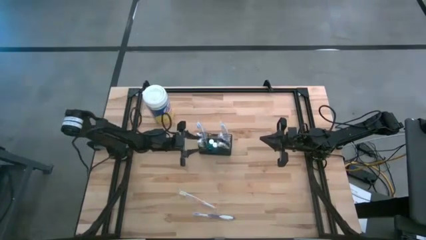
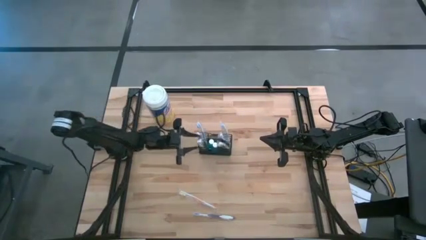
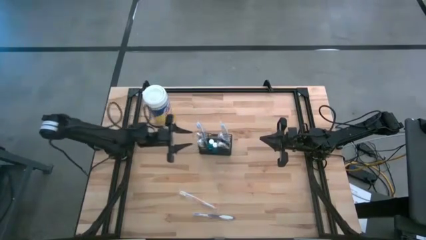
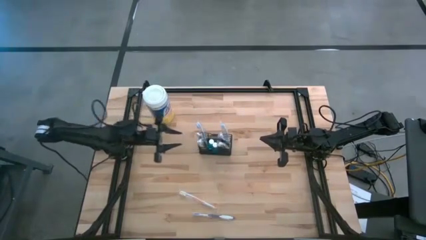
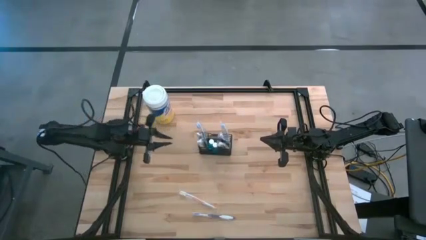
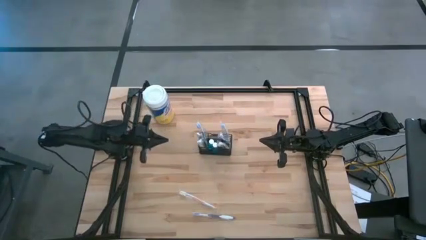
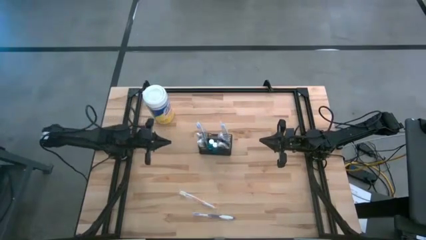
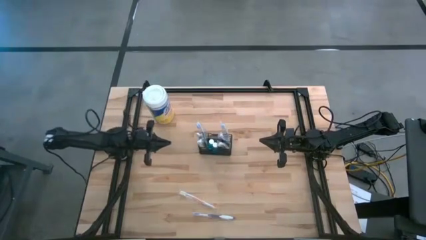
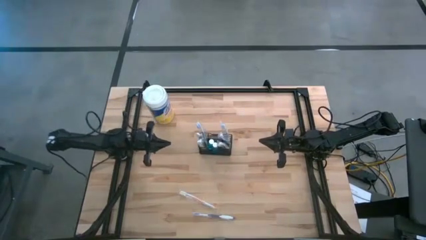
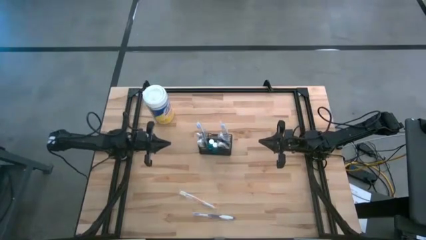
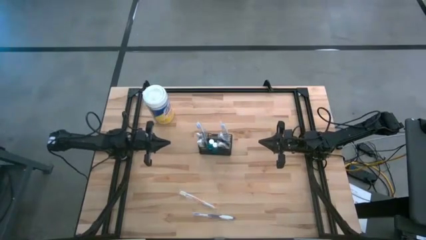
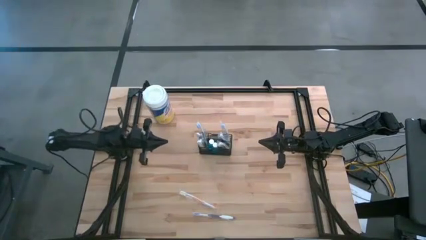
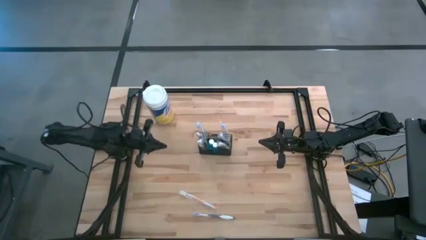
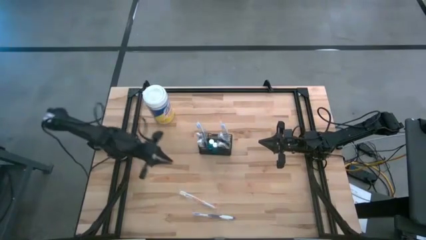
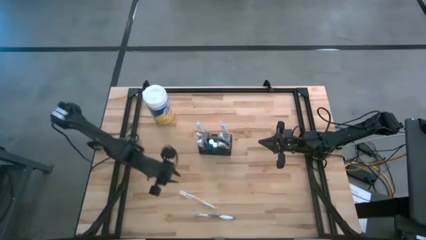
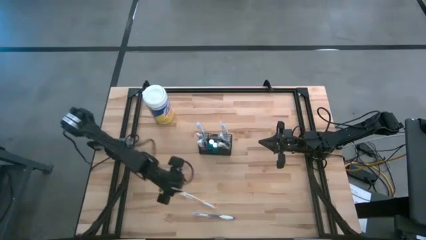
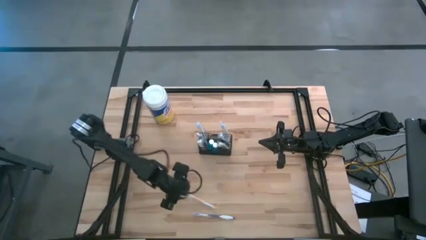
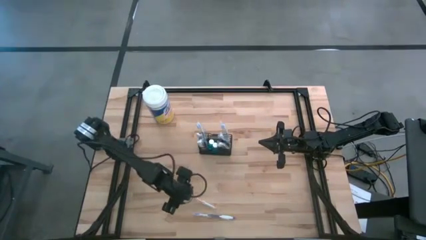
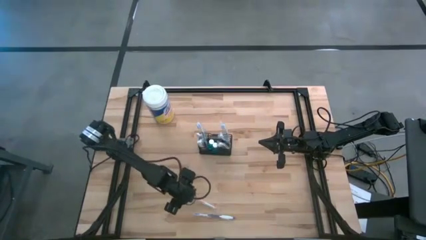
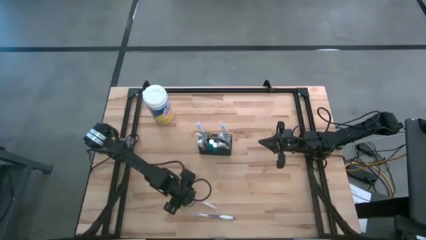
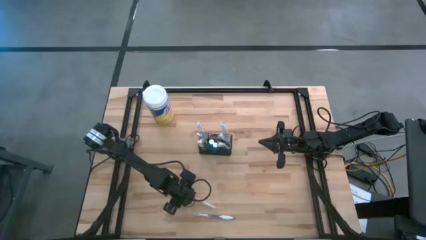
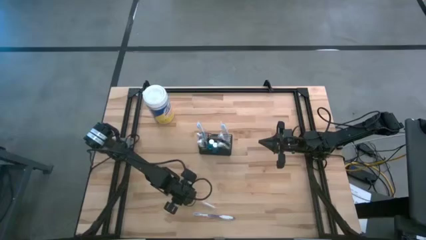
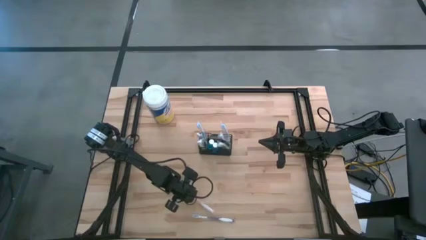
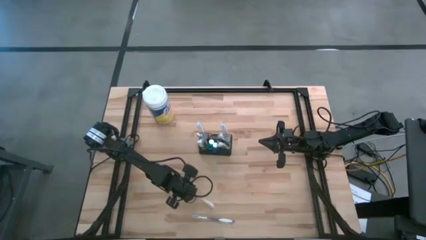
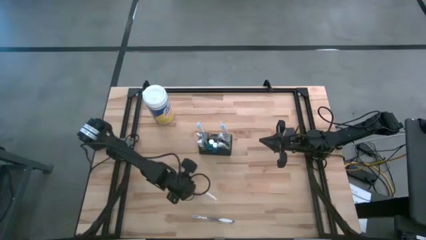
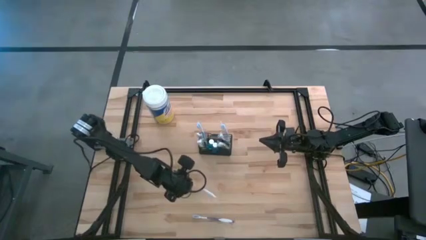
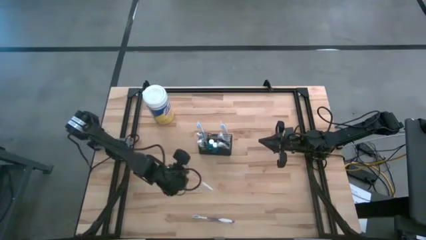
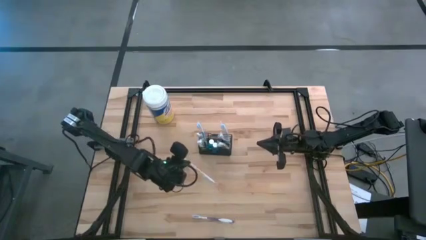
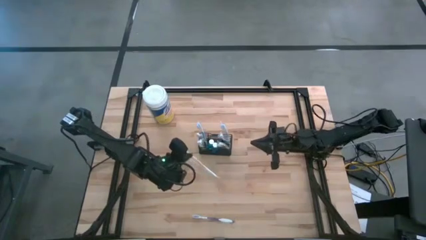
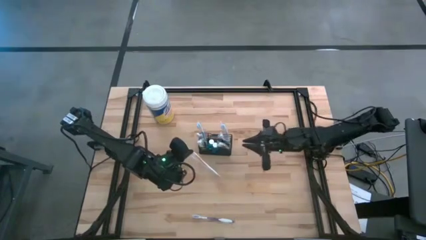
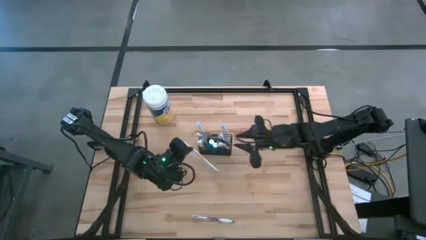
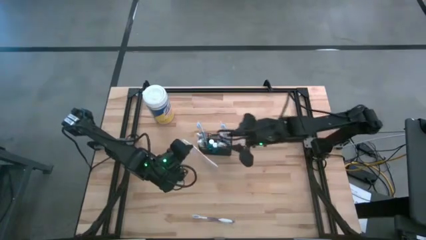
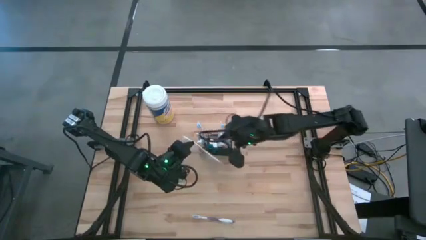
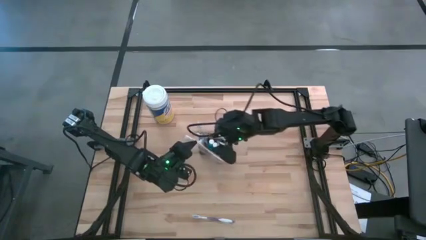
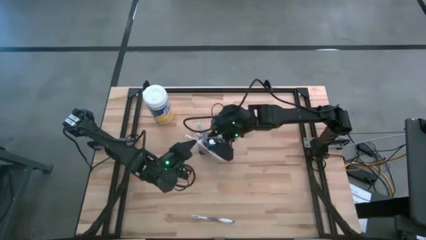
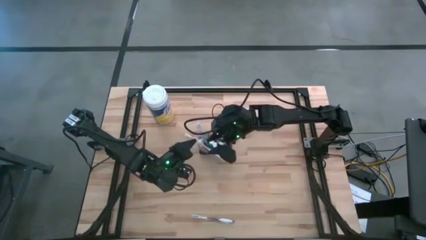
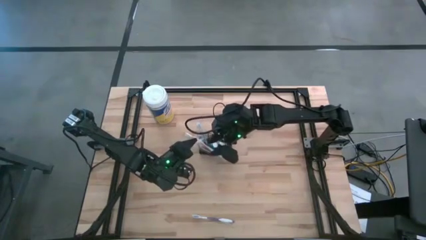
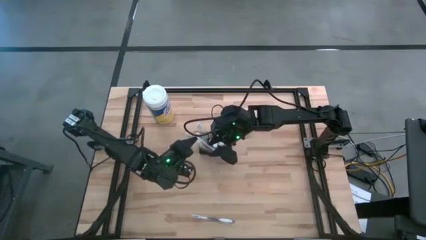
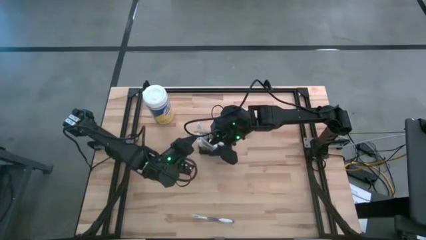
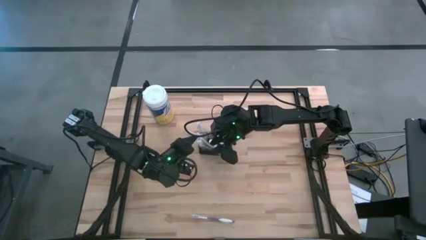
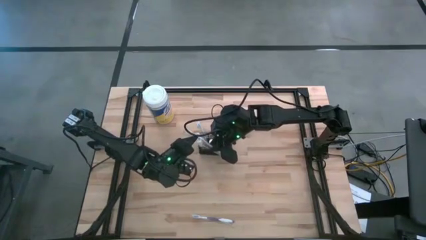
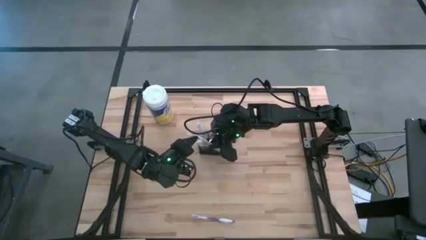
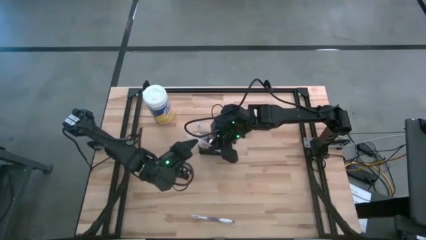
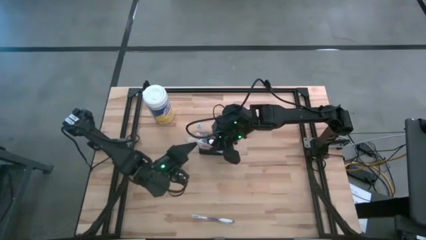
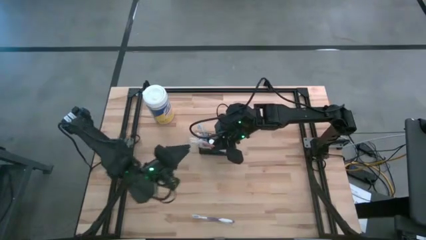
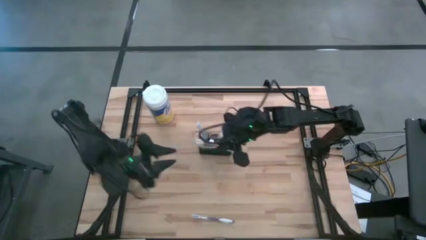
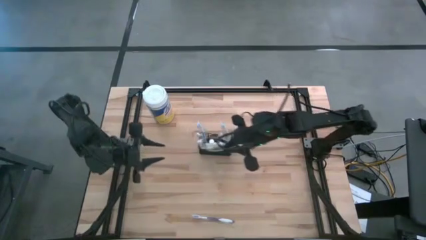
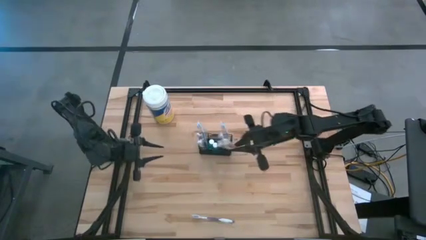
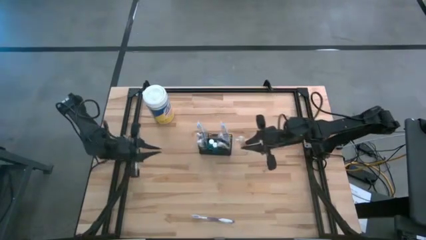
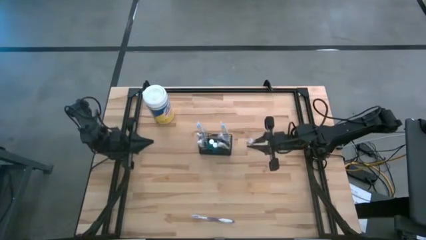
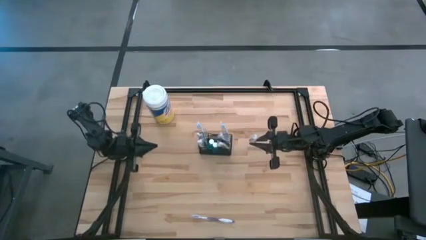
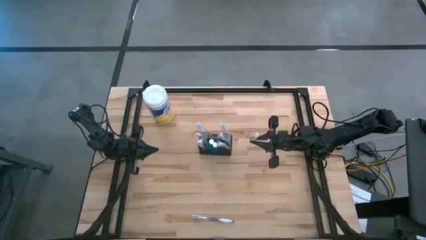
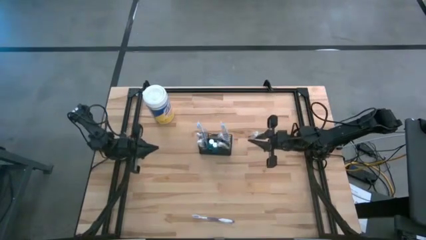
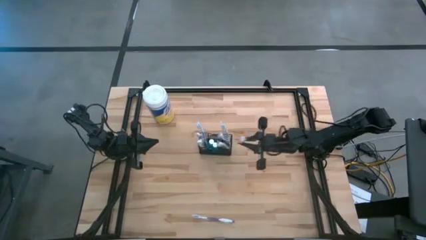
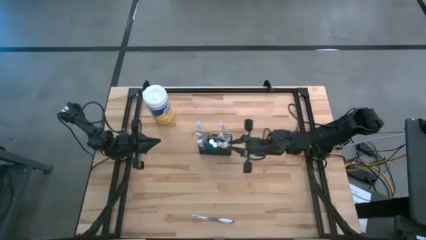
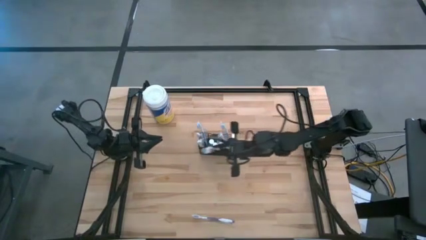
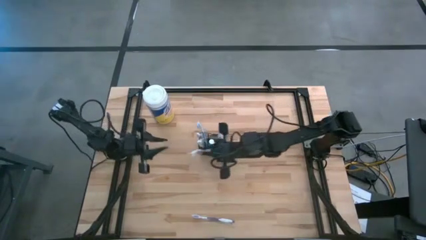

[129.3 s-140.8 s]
Task: Pick & Place toothbrushing station
Put the orange toothbrush into the mesh organizer

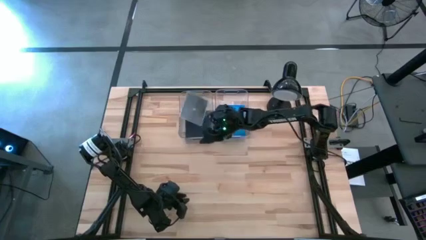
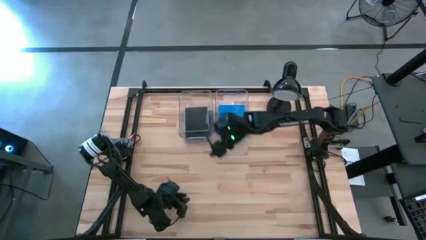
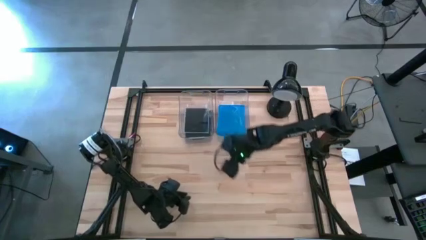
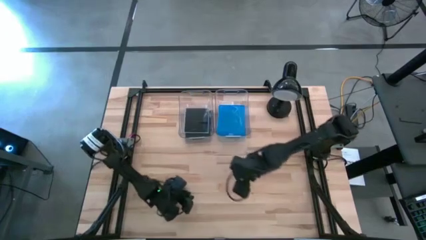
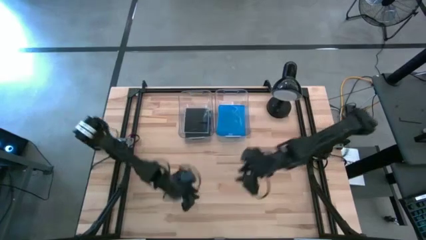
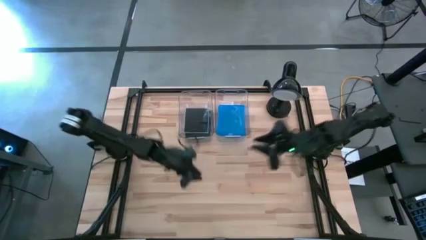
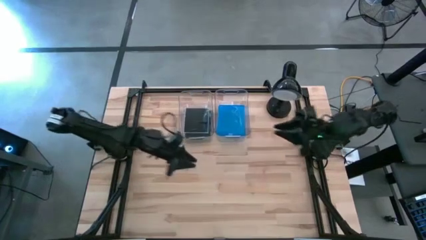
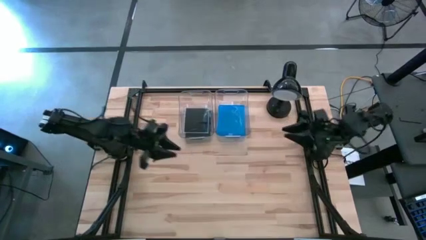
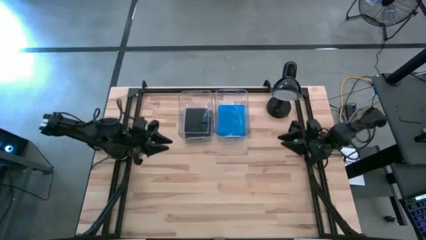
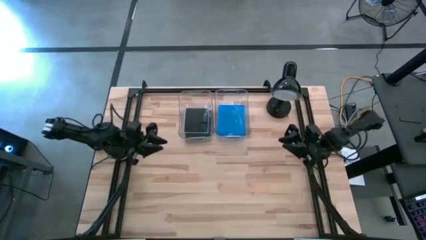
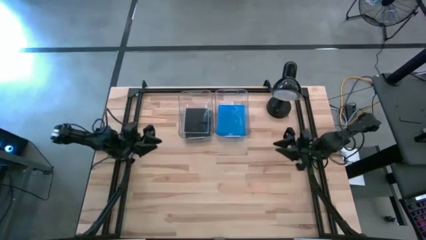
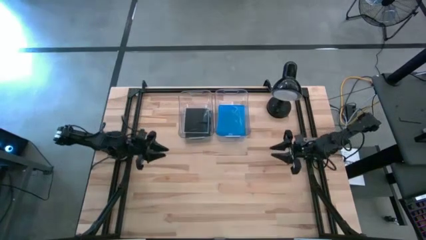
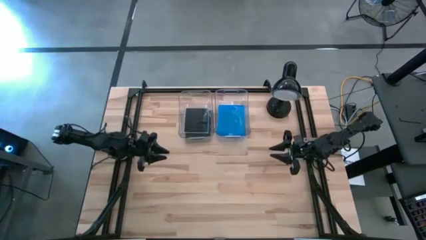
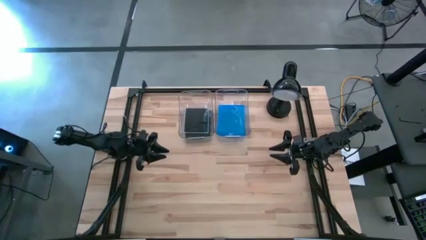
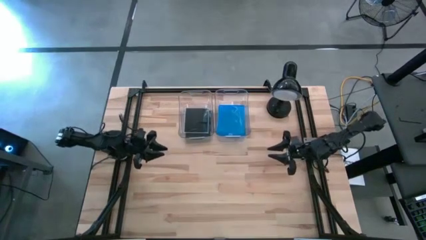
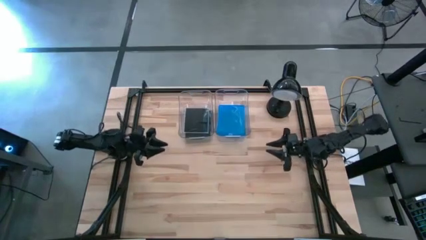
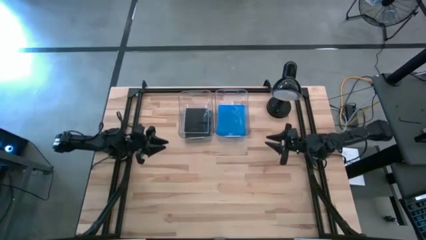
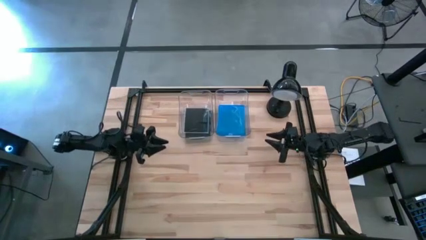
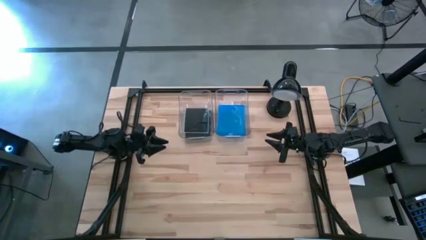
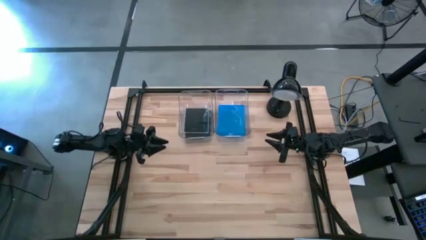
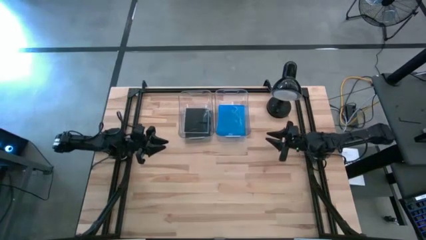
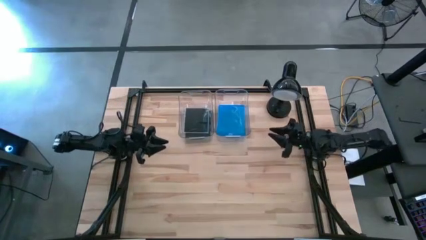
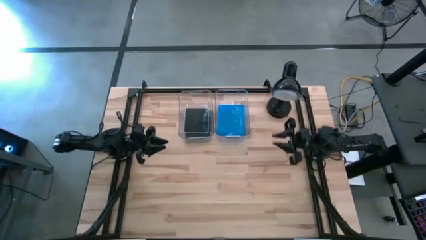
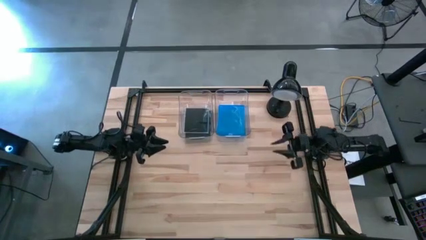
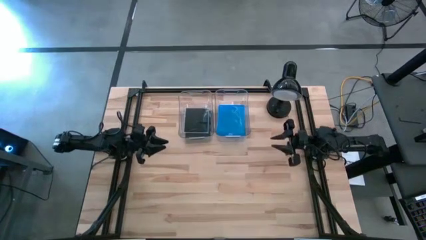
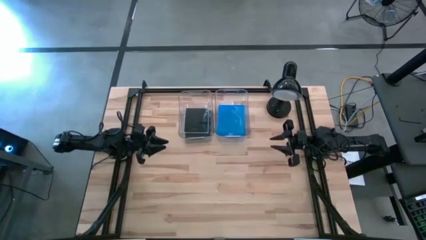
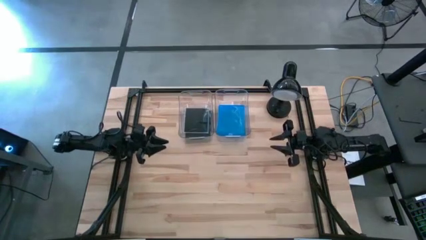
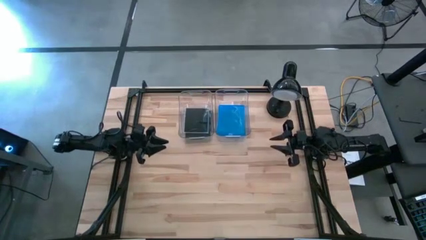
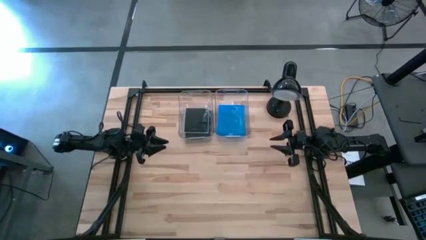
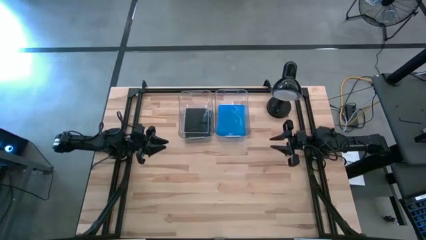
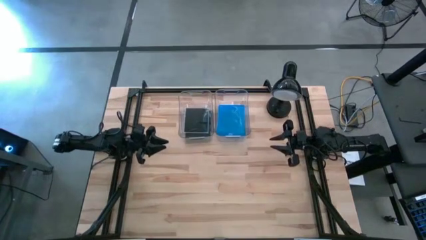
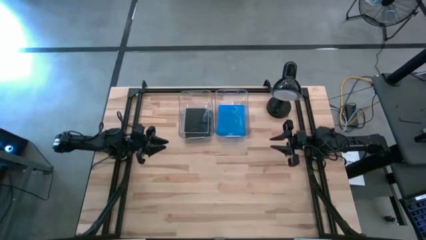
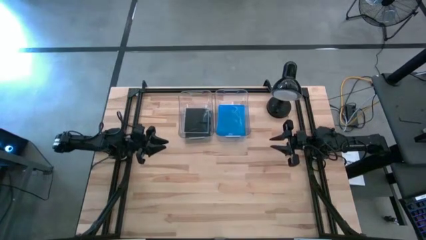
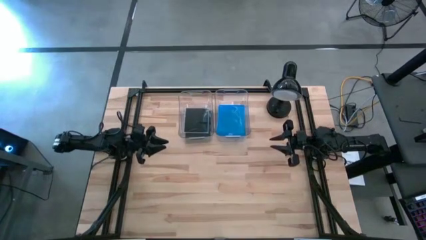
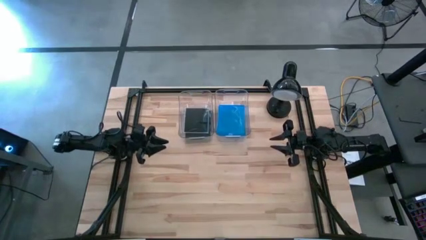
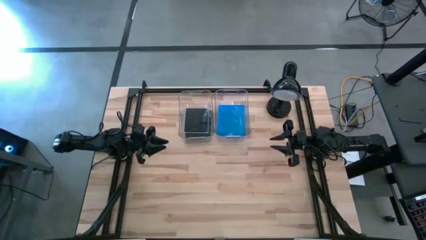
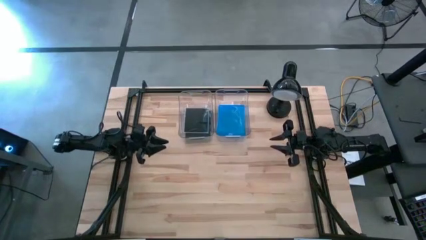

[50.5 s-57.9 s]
Task: Pick & place jewel cases by type
Return to Home Position
